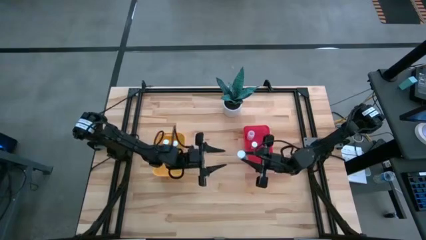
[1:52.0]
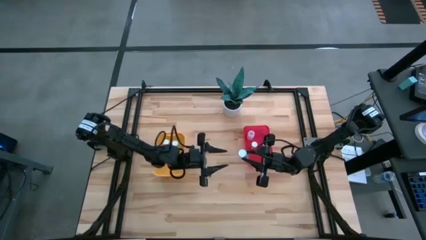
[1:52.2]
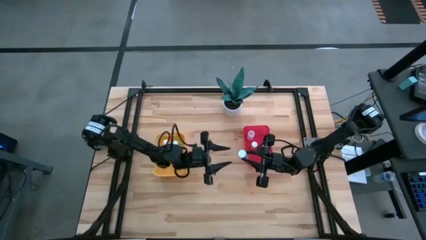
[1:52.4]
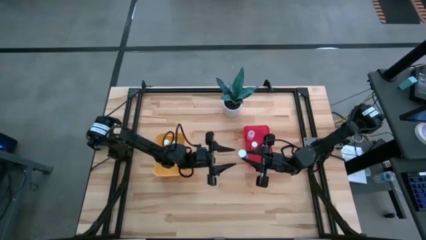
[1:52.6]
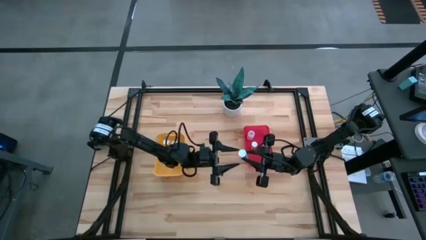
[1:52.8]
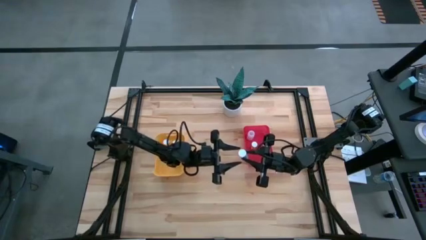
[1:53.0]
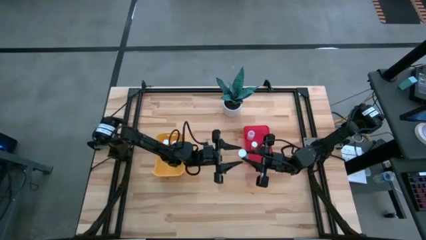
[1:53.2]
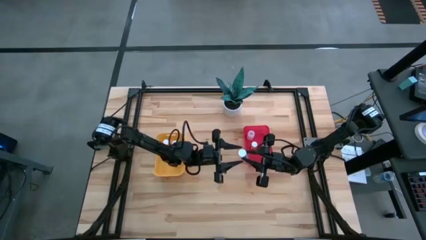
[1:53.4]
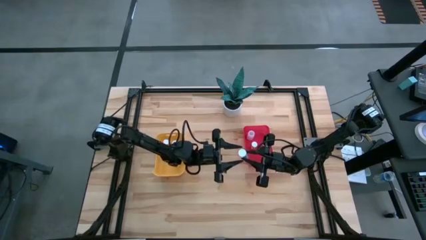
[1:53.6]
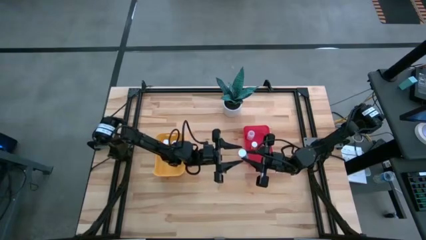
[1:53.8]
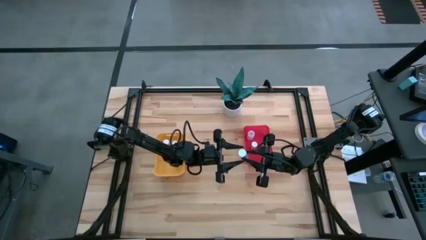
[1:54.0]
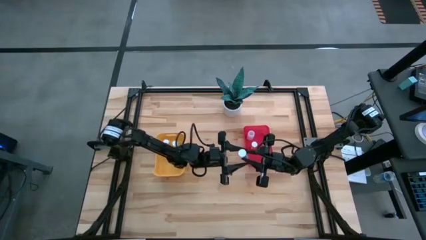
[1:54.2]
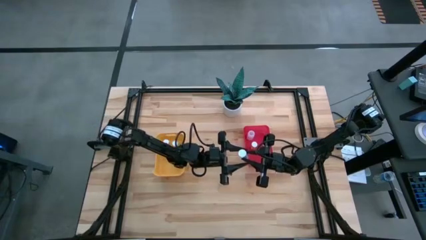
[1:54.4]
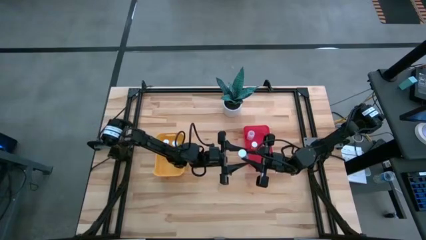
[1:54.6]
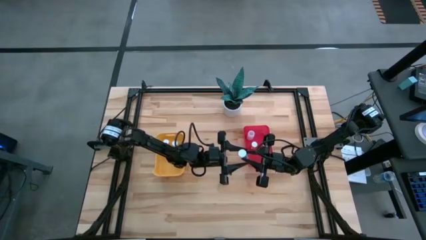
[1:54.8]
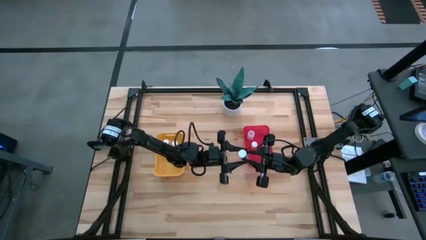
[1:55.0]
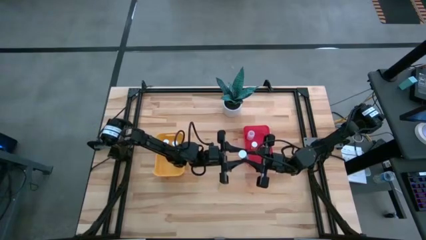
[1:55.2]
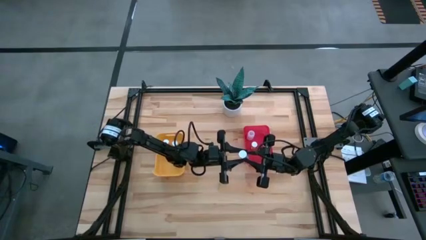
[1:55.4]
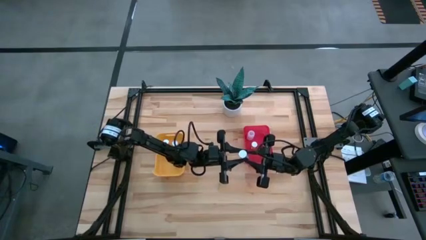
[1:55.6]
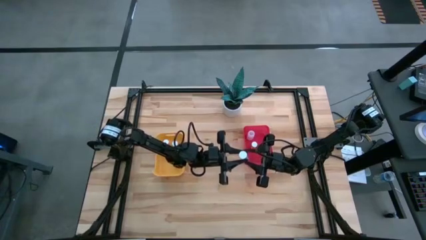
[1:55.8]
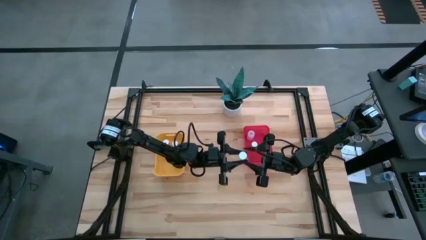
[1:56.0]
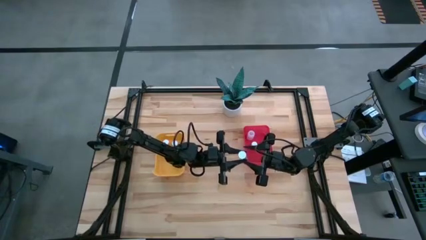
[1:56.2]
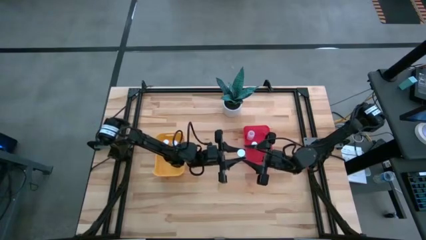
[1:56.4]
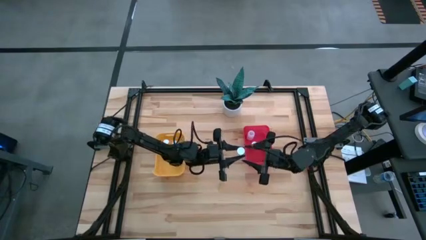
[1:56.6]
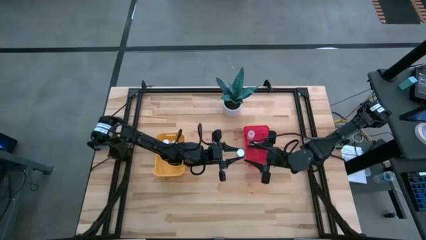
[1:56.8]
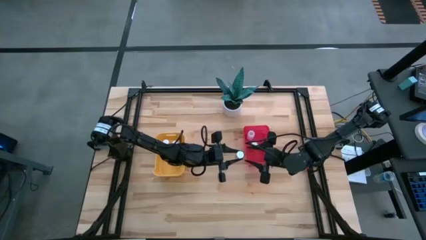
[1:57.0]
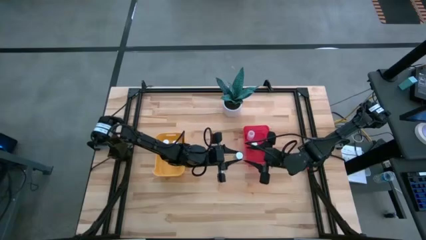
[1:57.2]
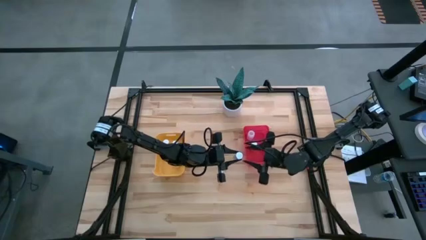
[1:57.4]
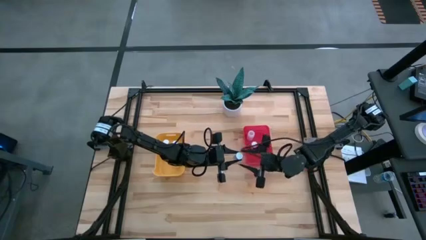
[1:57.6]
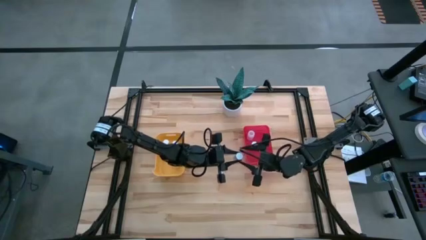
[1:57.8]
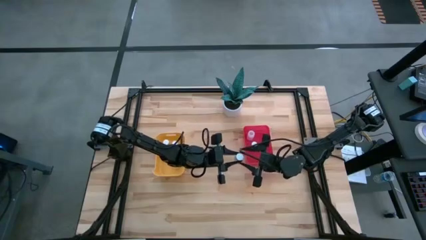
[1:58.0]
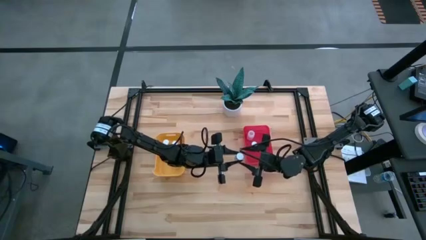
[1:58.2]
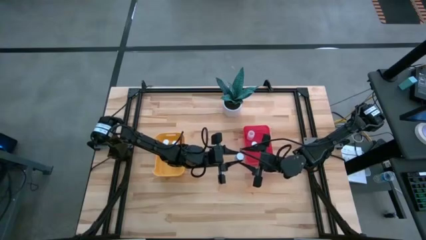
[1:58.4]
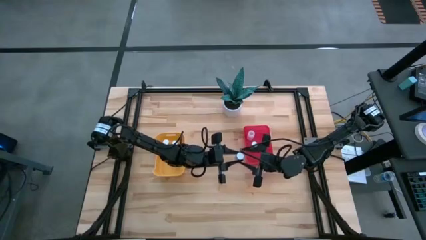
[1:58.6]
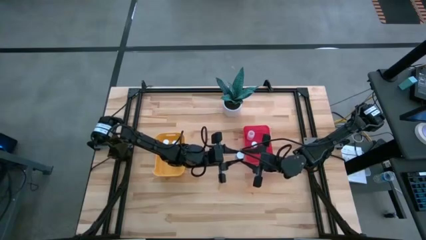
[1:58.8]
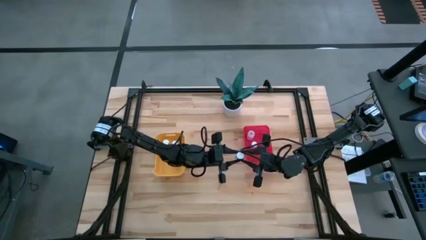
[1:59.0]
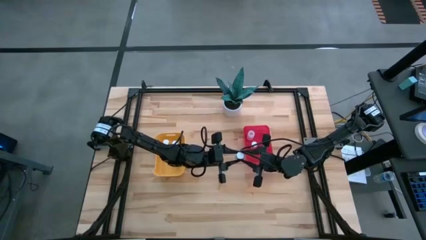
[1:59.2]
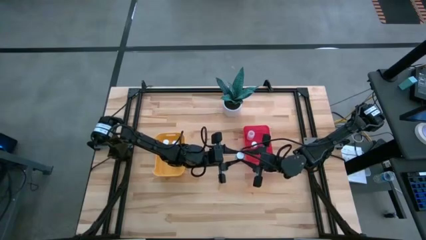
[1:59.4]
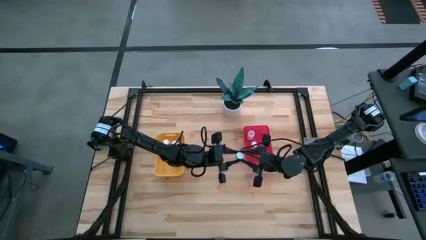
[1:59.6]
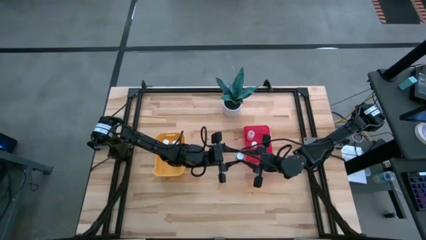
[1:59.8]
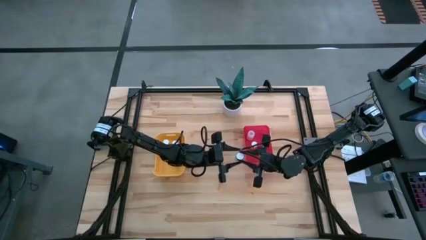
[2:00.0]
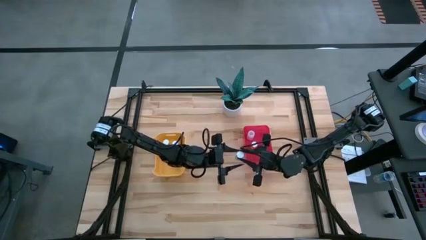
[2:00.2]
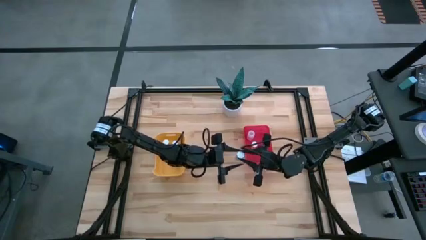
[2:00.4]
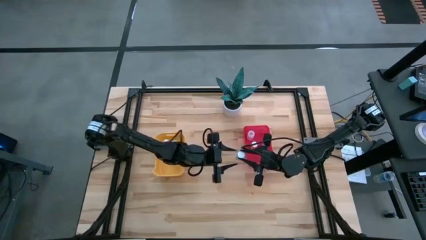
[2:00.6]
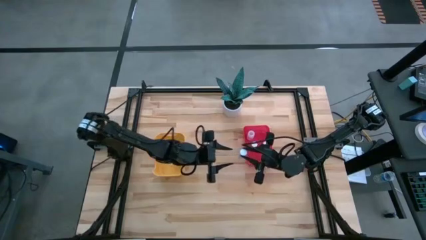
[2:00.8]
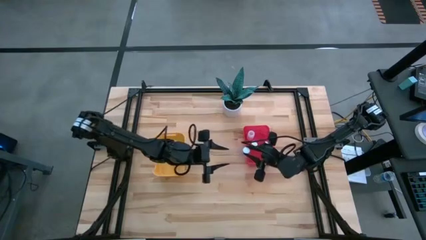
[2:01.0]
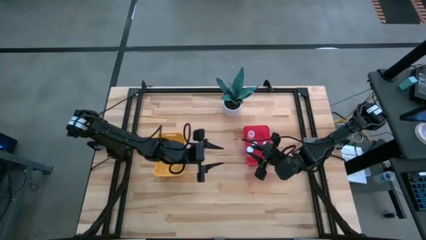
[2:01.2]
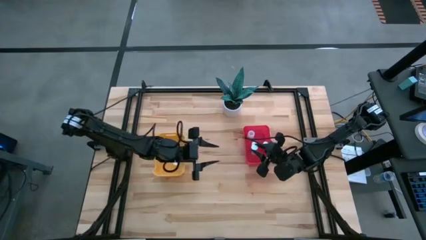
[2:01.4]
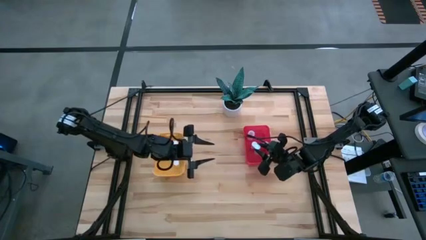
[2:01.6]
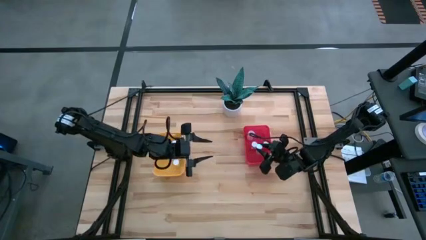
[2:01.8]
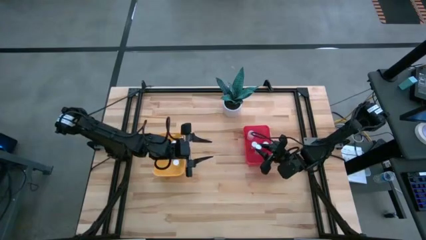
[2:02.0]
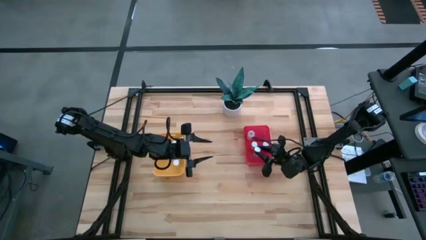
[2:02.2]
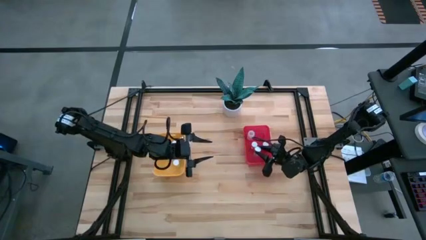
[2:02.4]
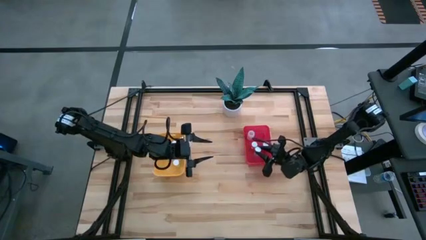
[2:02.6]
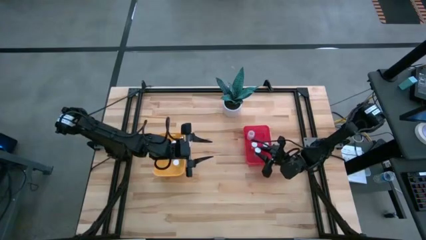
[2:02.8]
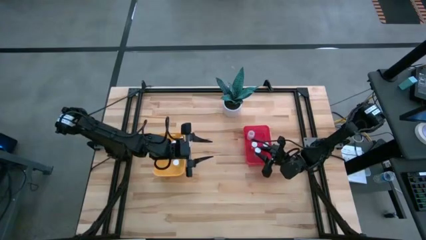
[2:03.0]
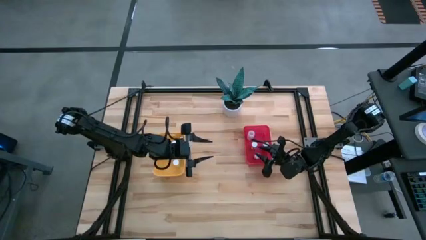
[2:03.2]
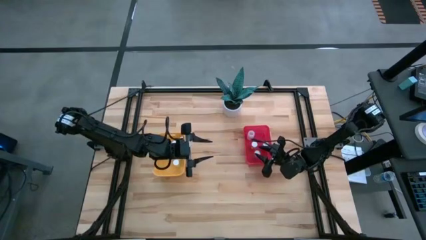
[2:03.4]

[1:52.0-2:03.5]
Task: Pick and place medicine bottles into bin by pill shape (circle, oval)
Put the blue capsule bottle into the red bin

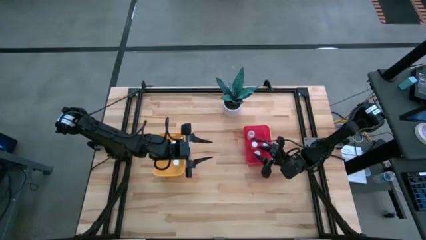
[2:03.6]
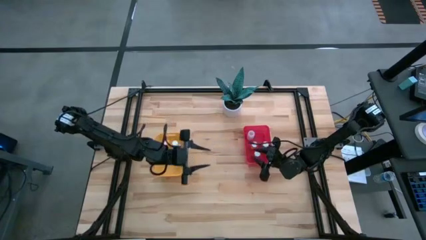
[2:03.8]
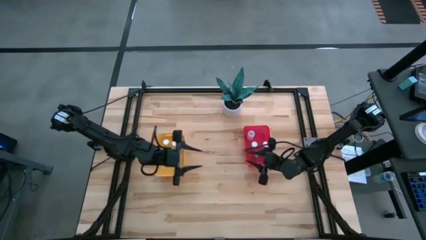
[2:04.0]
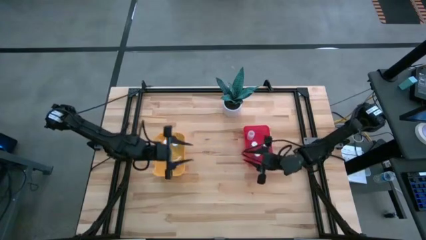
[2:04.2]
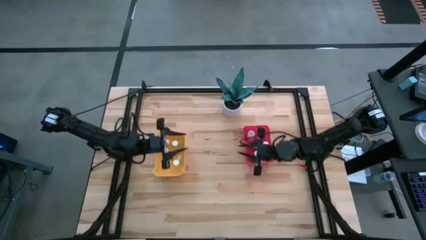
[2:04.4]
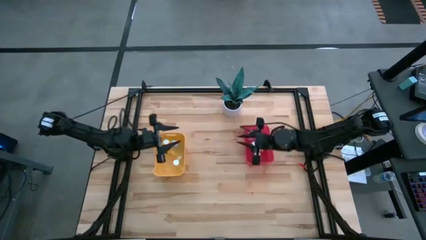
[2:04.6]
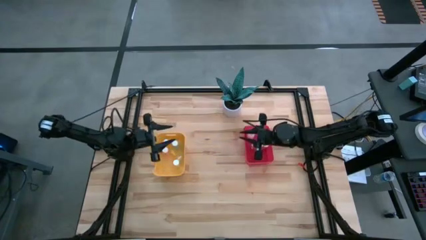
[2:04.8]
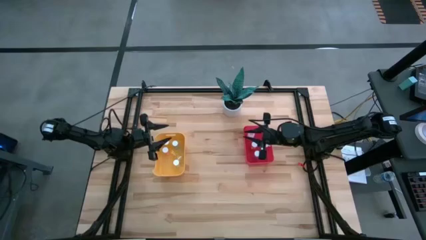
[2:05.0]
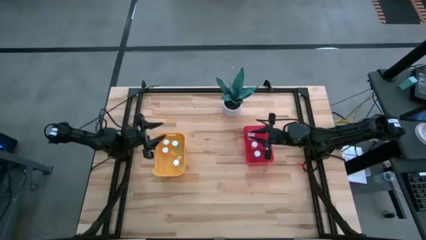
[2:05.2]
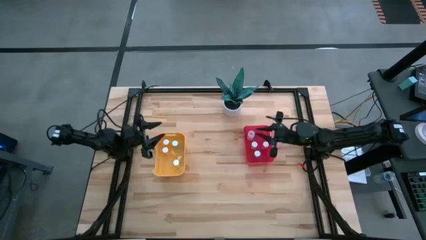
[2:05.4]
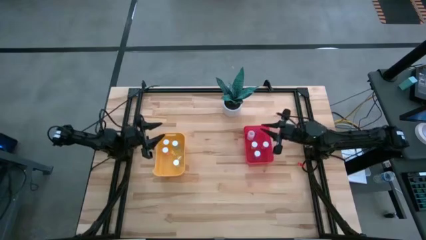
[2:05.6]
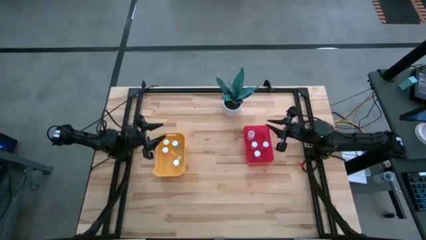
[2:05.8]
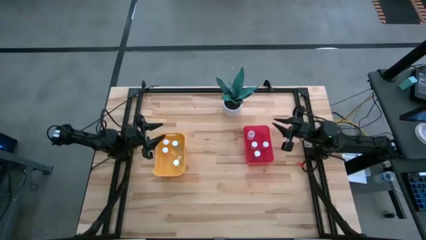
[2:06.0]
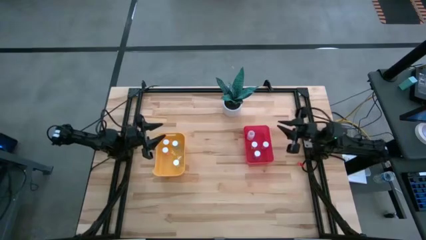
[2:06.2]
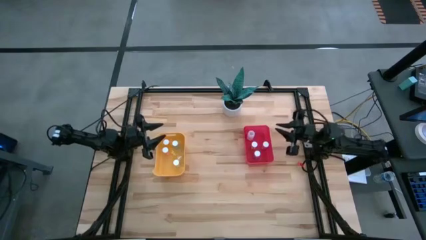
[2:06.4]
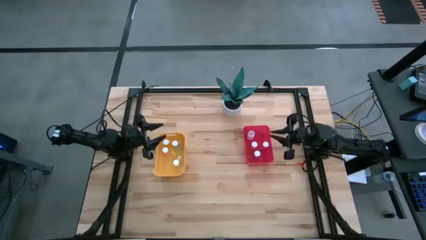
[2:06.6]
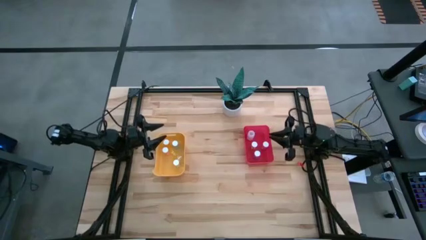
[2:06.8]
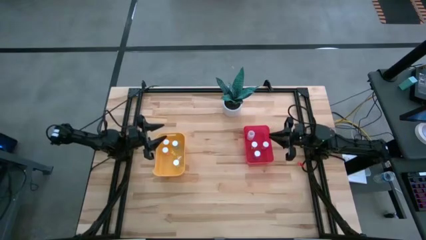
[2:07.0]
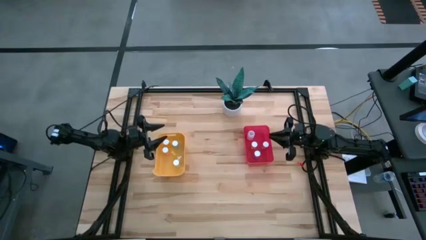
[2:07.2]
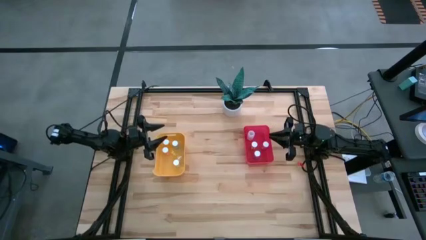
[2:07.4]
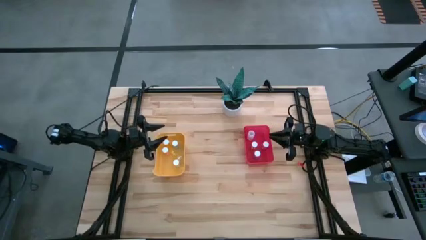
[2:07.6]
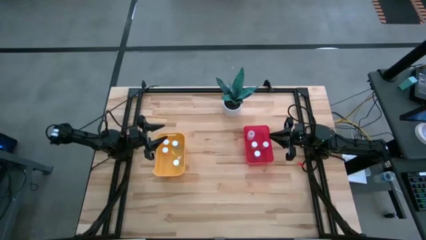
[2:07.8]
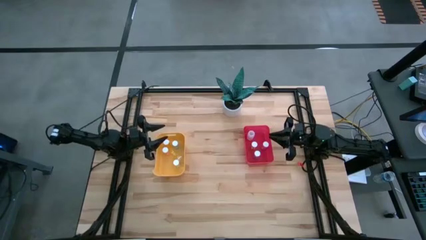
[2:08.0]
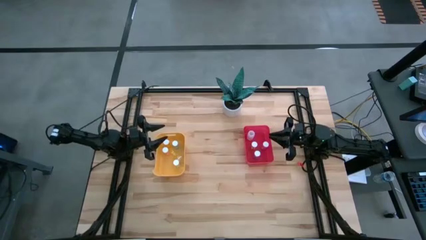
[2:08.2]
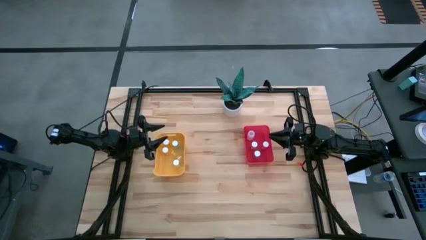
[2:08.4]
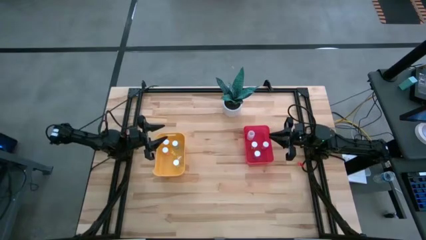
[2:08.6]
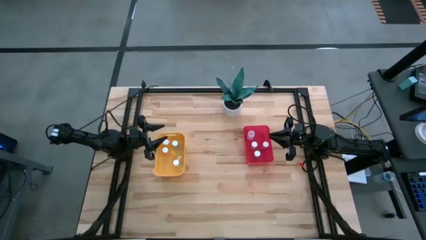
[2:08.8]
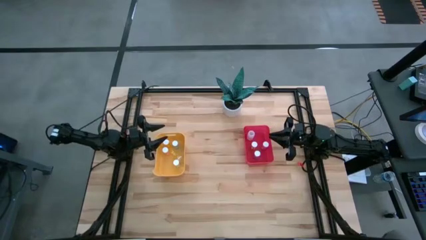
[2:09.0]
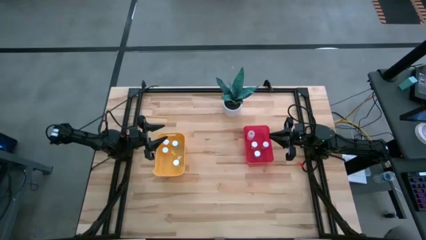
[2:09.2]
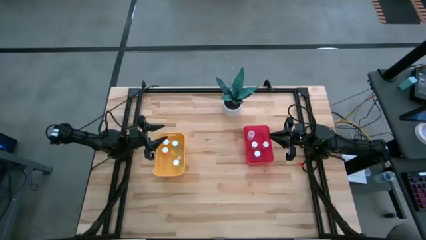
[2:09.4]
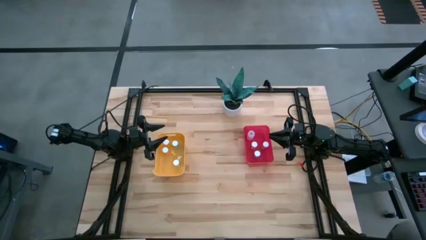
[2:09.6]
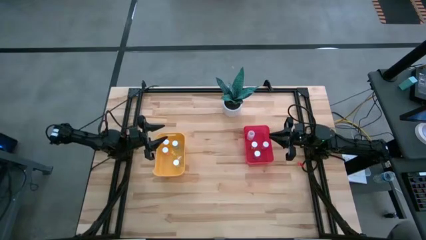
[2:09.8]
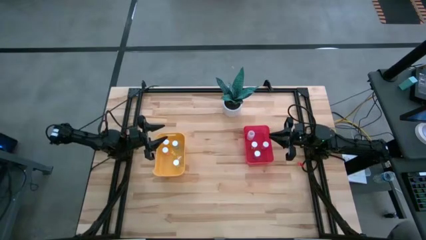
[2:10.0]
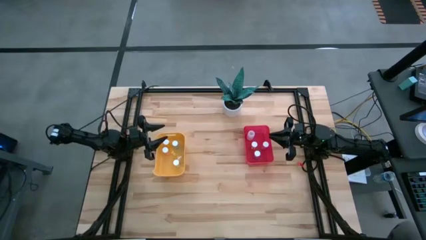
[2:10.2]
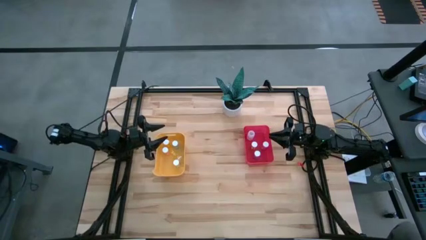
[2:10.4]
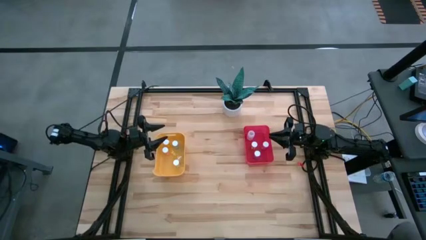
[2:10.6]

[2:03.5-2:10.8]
Return to Home Position
